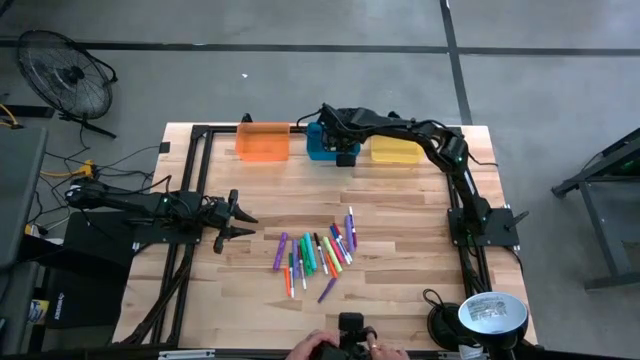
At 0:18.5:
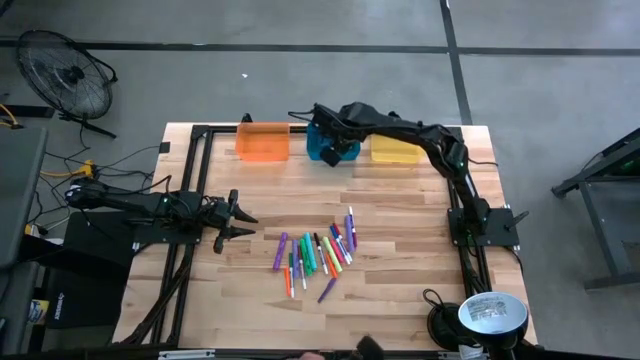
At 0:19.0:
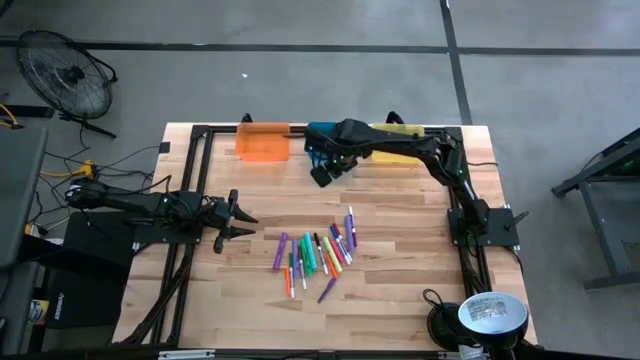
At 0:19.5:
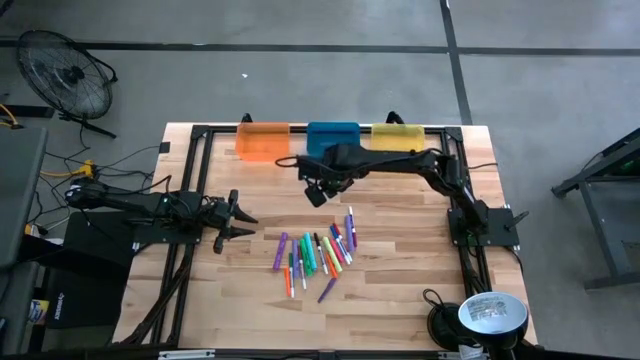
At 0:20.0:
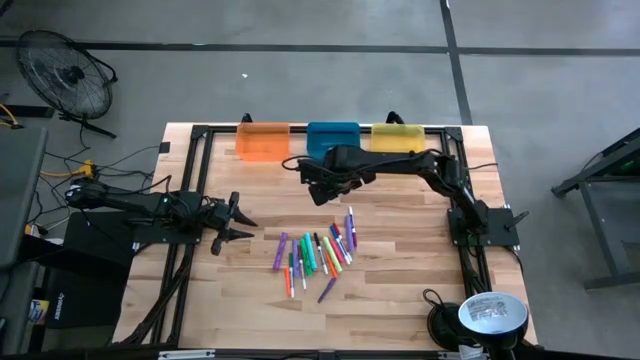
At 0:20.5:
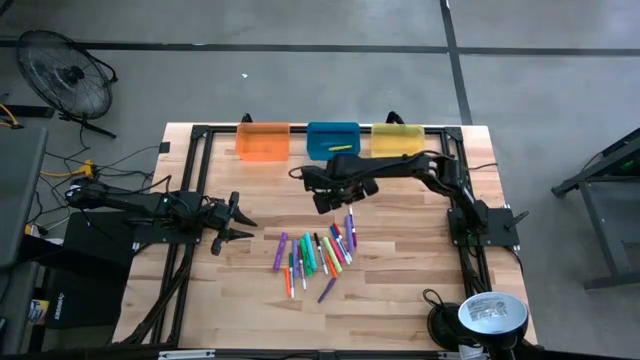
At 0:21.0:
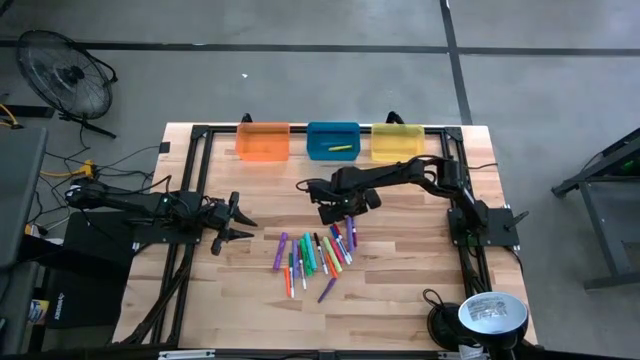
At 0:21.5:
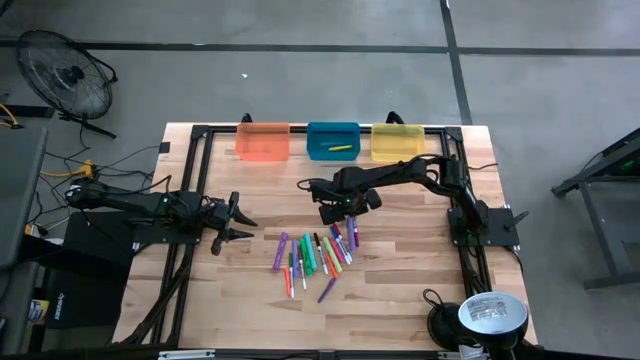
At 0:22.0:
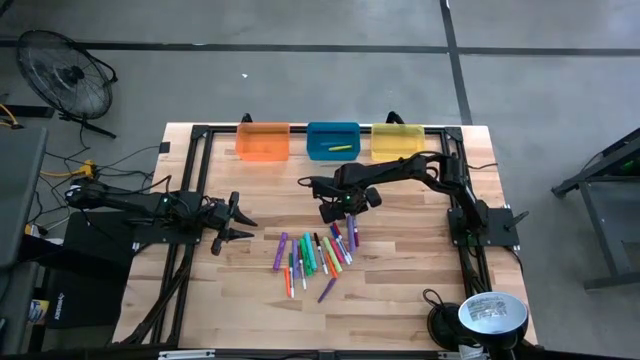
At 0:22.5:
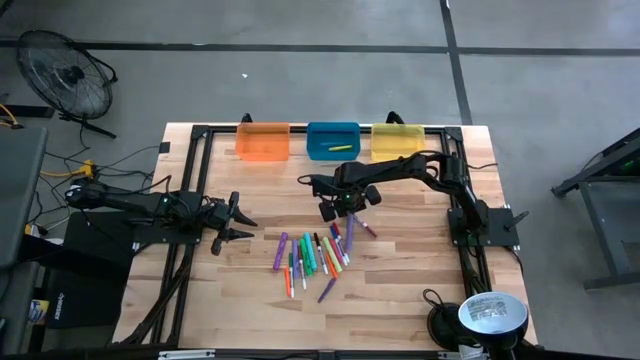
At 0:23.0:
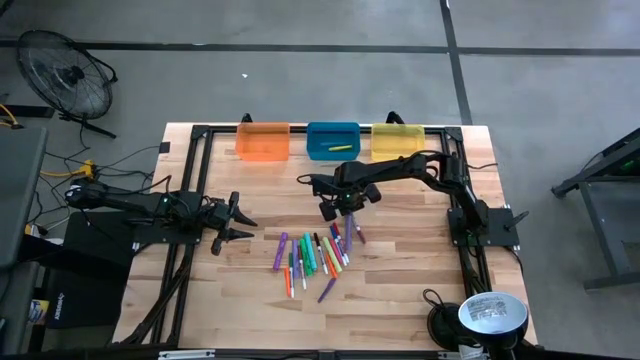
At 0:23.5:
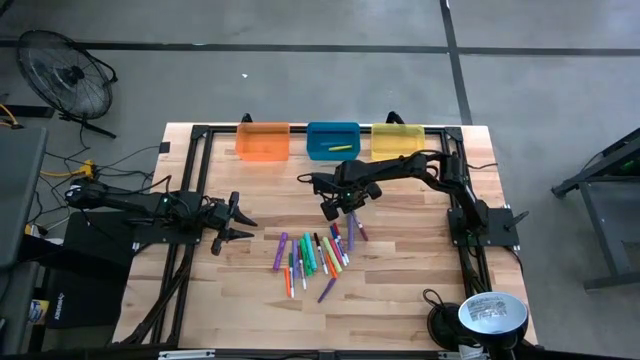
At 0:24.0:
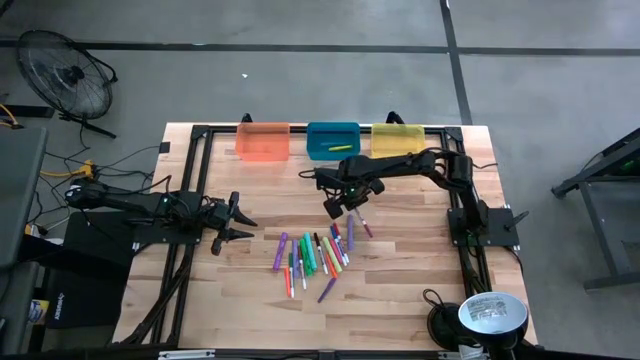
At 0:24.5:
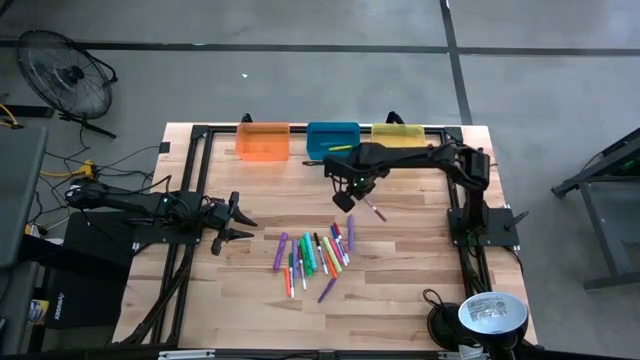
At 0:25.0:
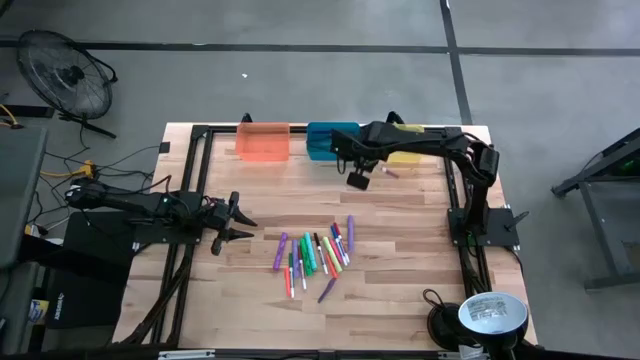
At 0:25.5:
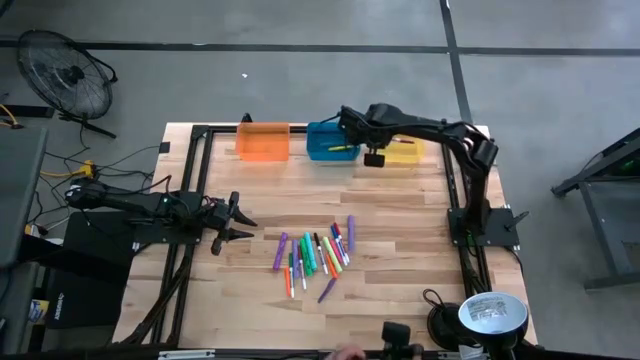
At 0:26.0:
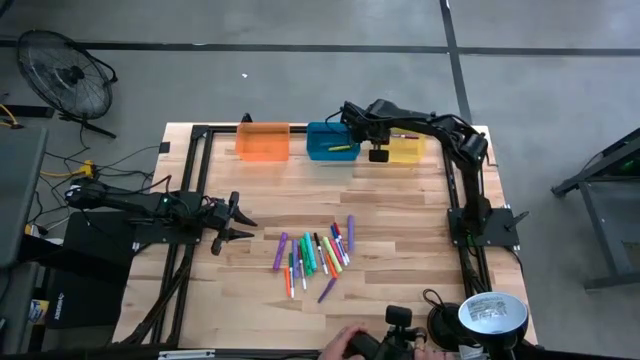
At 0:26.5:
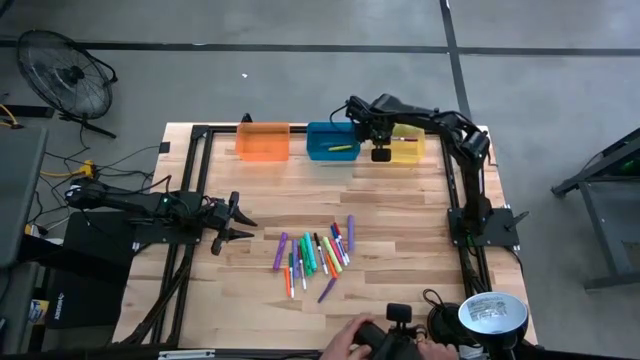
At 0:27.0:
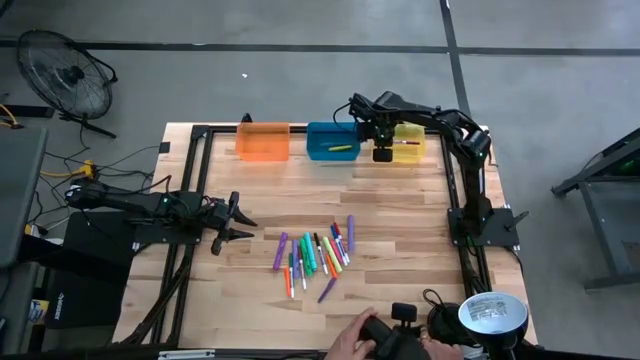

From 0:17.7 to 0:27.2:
Task: Pick & Place Markers
Put the violet marker into the yellow bin

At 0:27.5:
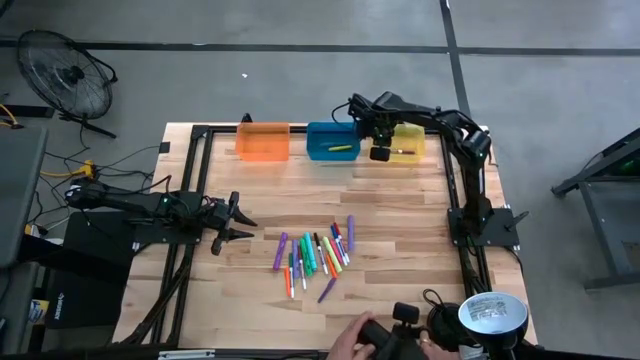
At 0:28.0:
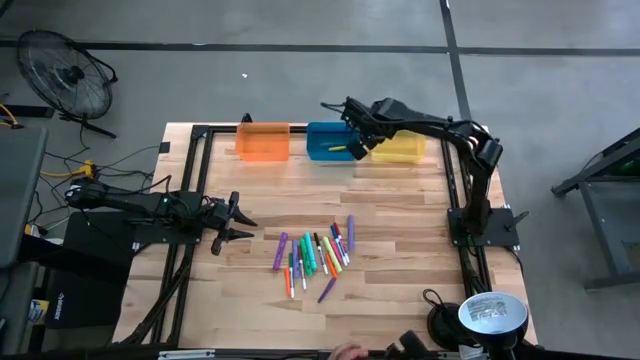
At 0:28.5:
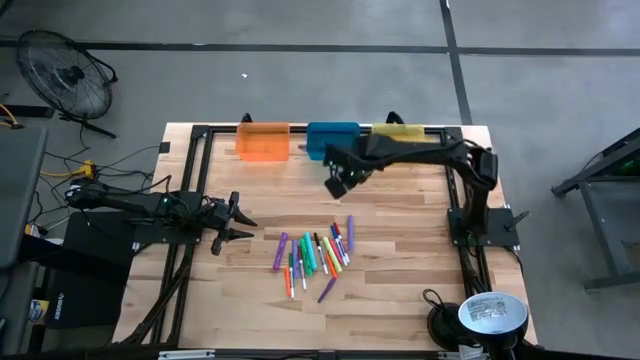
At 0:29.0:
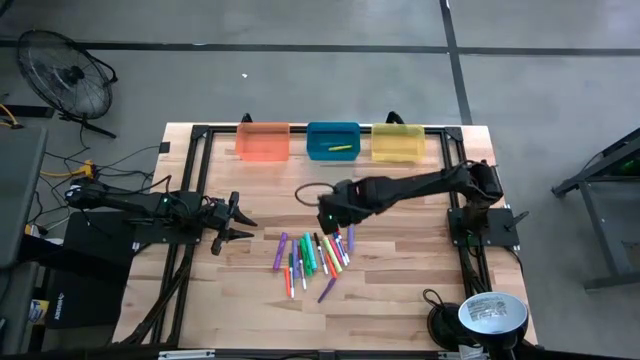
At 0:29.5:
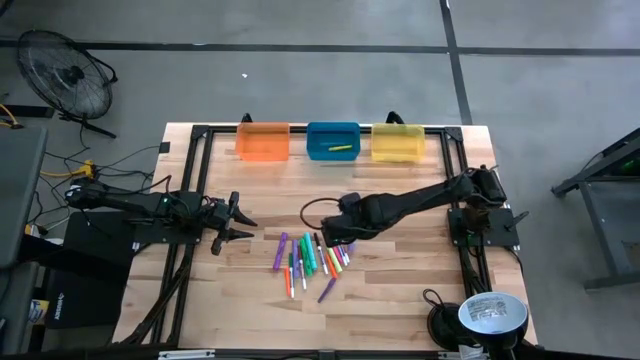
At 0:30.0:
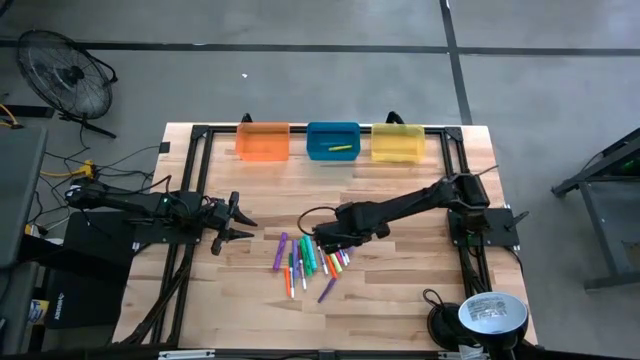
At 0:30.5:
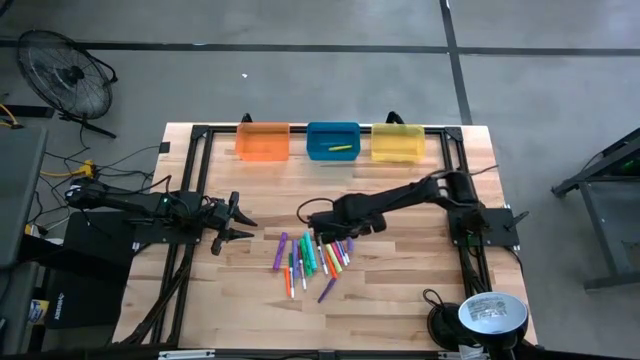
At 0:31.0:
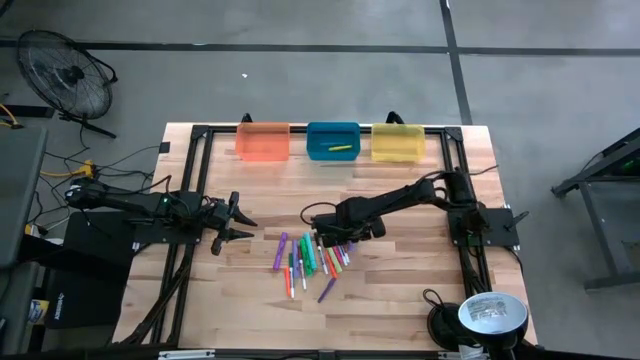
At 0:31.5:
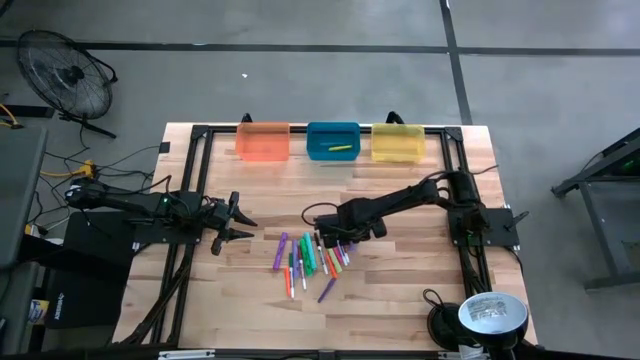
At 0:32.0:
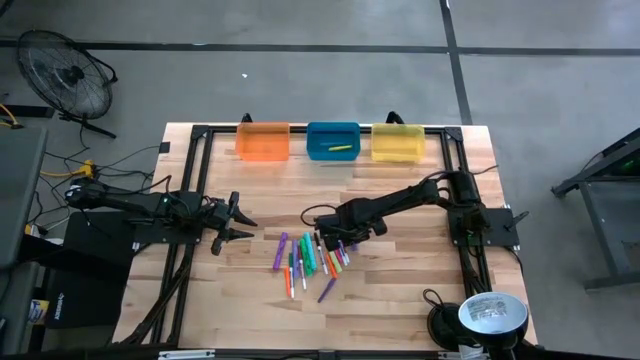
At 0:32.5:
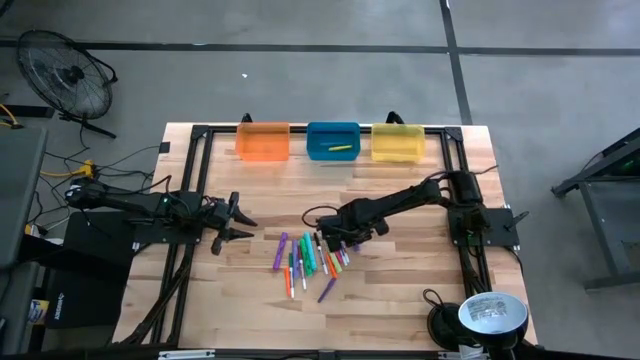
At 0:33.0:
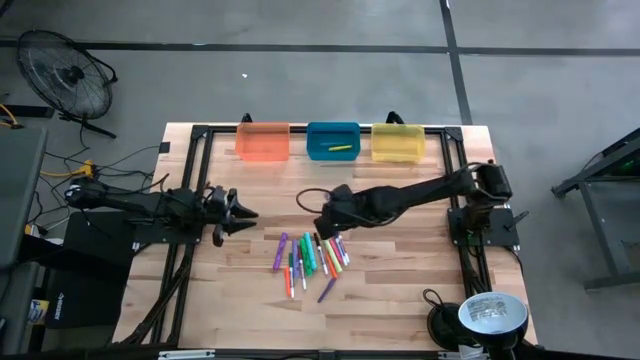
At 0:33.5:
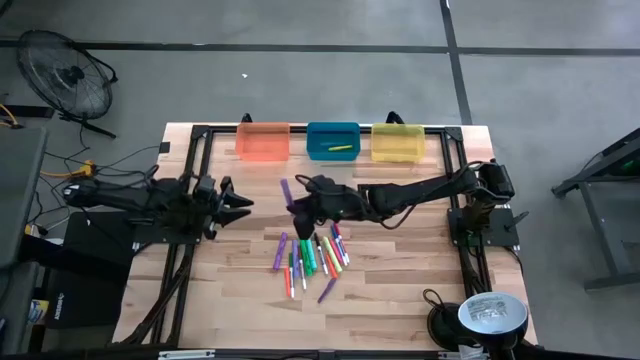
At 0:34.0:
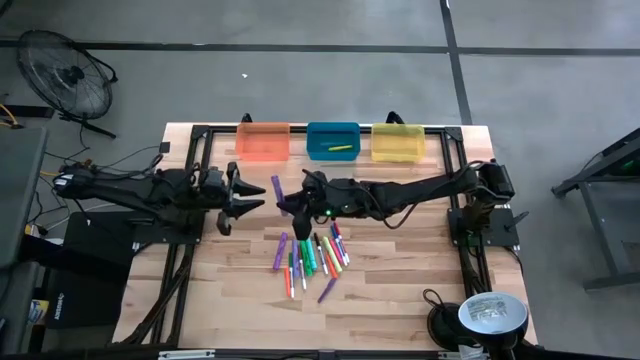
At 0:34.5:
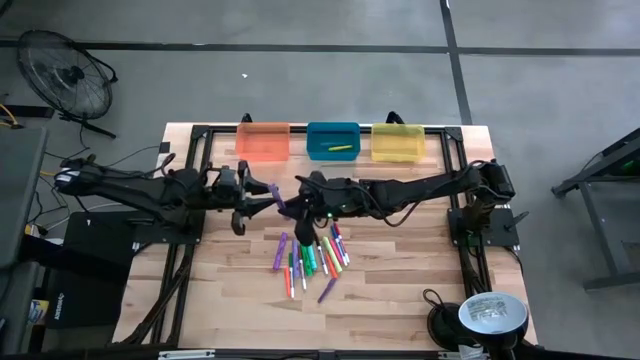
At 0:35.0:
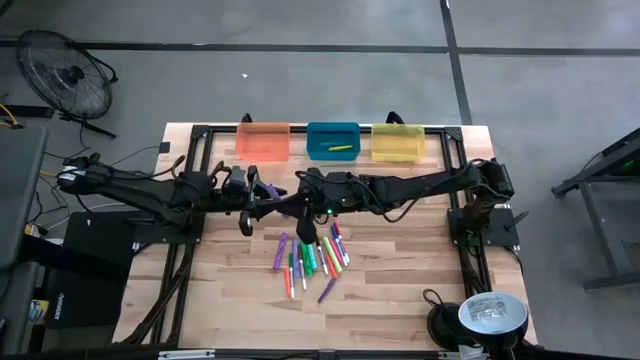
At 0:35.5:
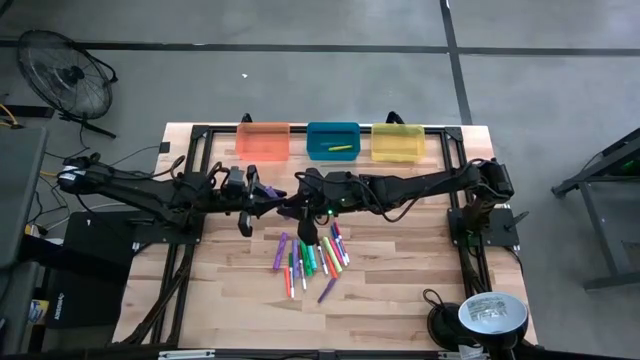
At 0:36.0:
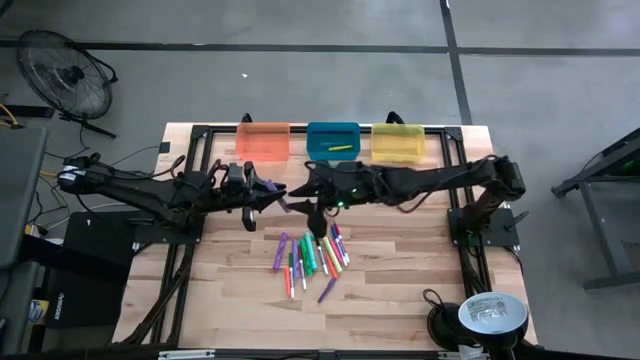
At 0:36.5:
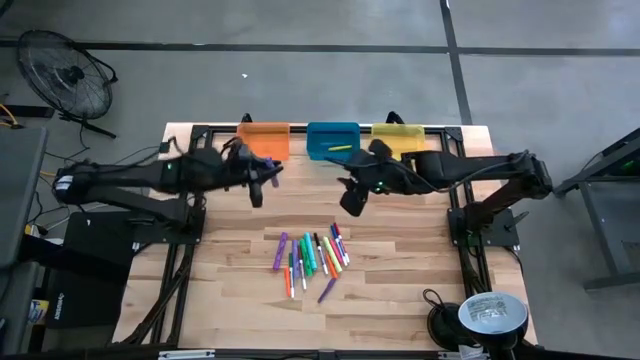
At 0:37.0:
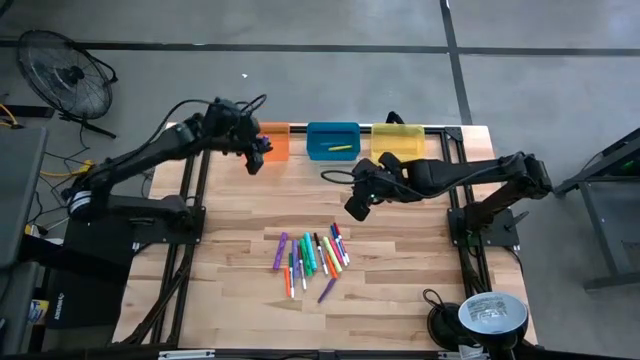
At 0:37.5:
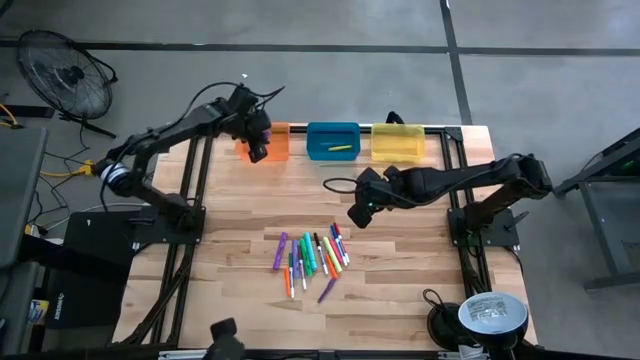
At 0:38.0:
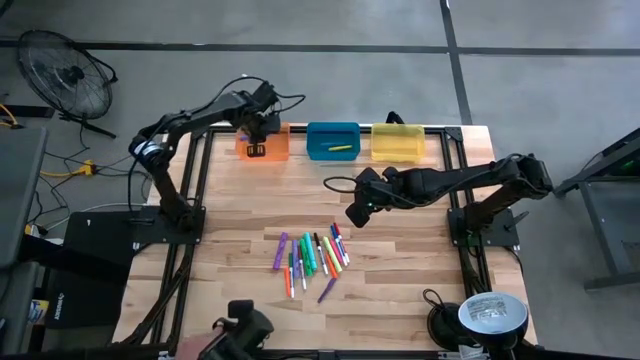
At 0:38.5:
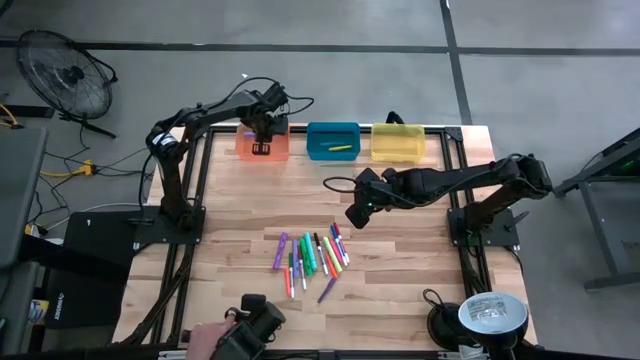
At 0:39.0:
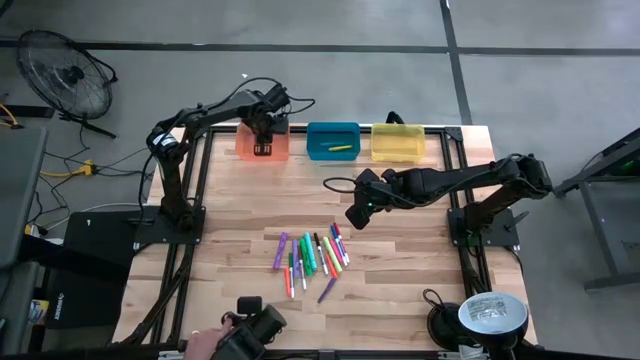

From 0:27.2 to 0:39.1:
Put the right light violet highlighter into the orange bin
